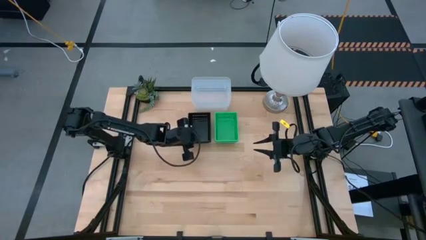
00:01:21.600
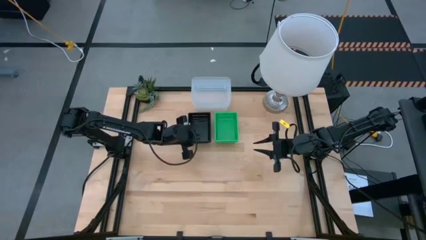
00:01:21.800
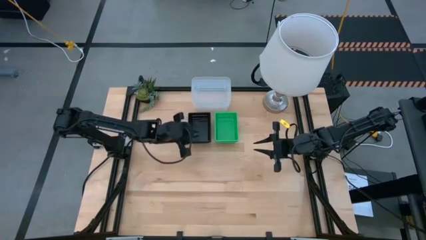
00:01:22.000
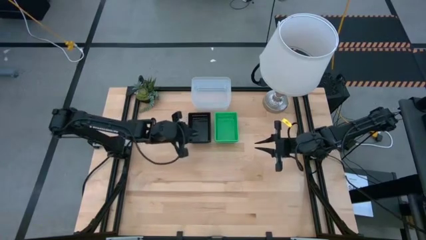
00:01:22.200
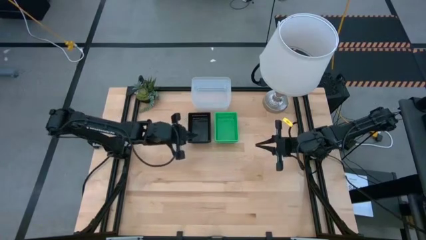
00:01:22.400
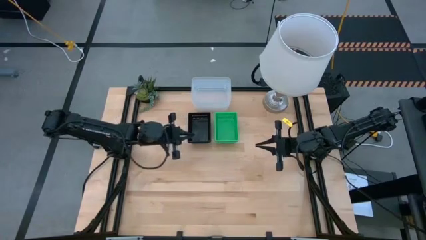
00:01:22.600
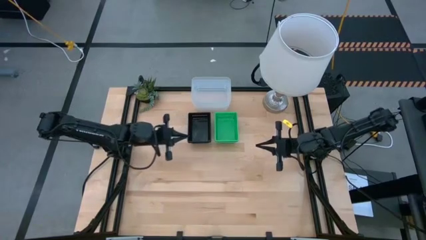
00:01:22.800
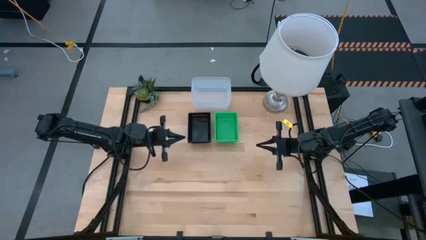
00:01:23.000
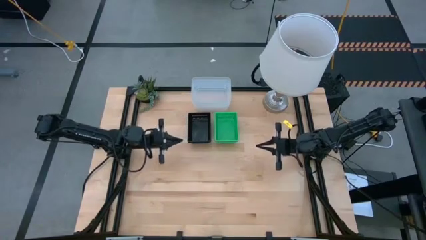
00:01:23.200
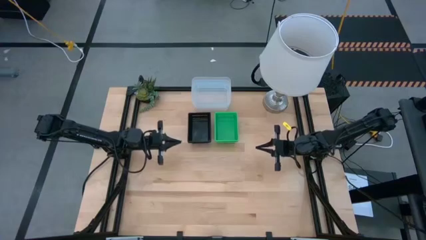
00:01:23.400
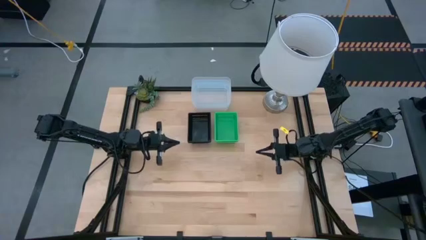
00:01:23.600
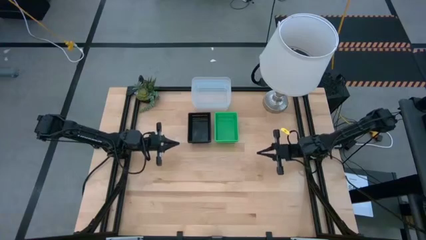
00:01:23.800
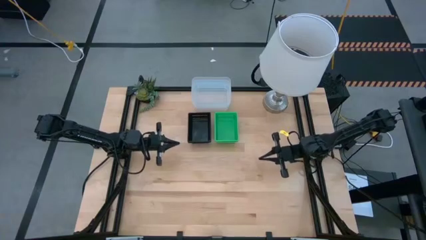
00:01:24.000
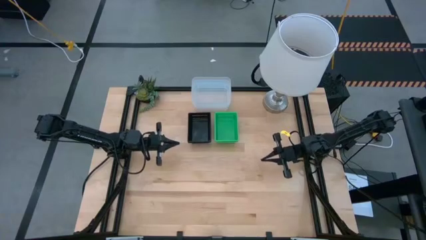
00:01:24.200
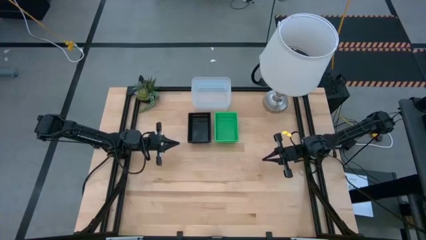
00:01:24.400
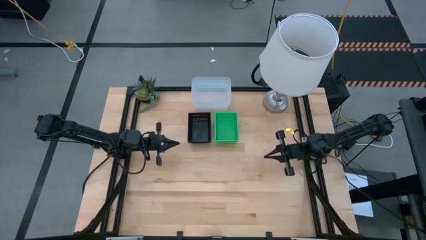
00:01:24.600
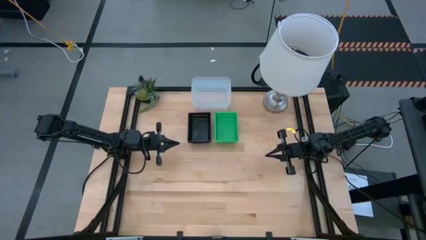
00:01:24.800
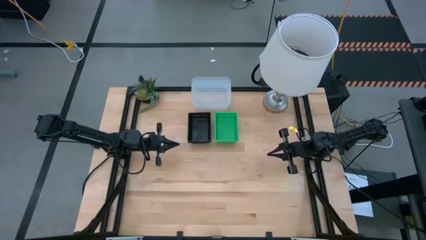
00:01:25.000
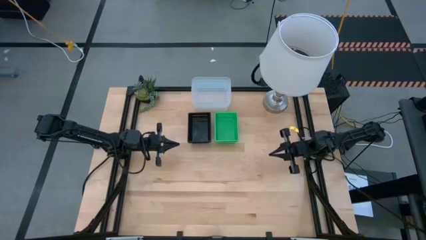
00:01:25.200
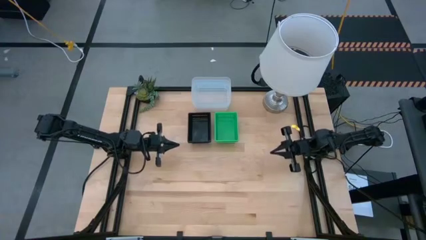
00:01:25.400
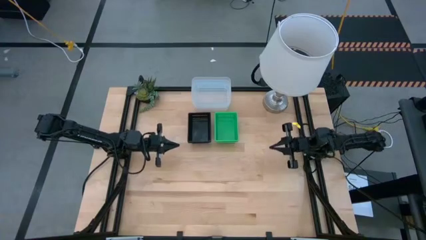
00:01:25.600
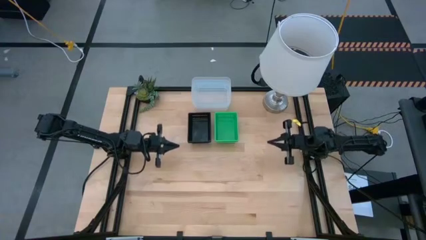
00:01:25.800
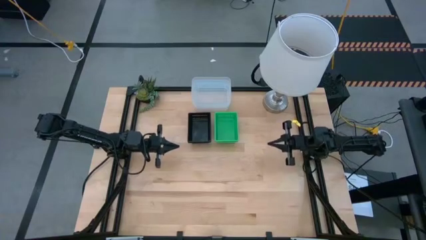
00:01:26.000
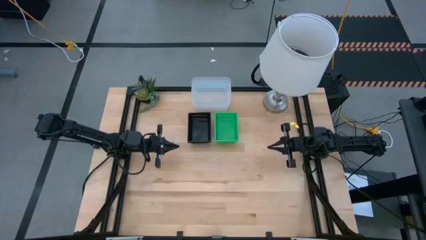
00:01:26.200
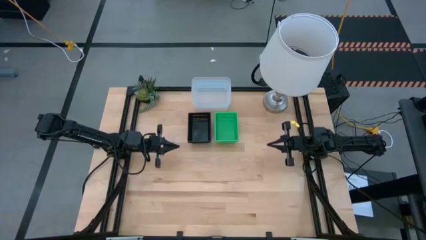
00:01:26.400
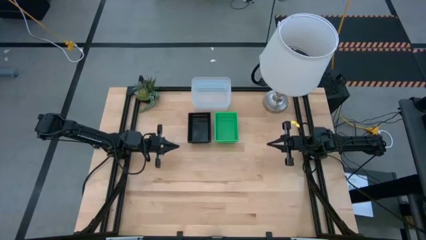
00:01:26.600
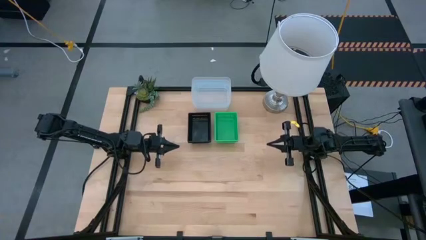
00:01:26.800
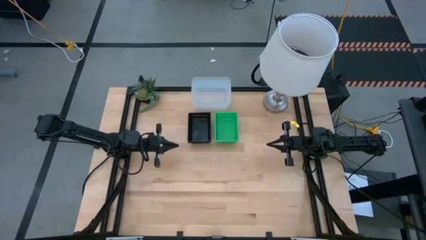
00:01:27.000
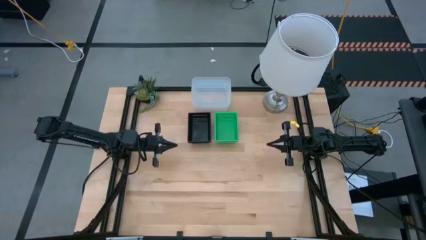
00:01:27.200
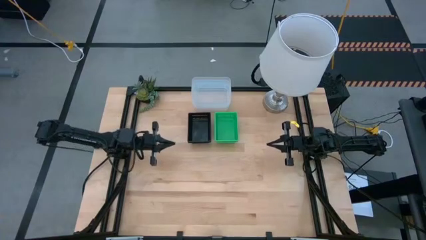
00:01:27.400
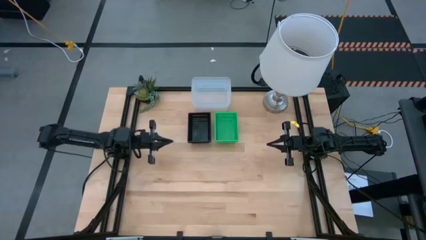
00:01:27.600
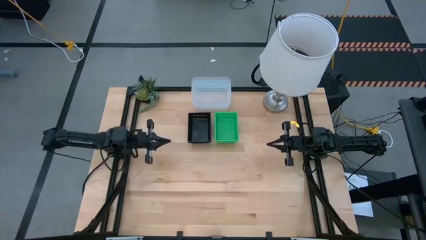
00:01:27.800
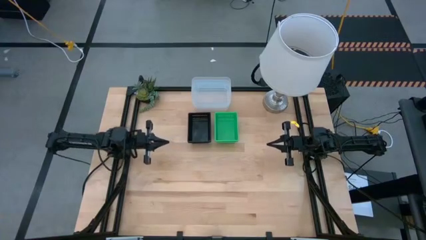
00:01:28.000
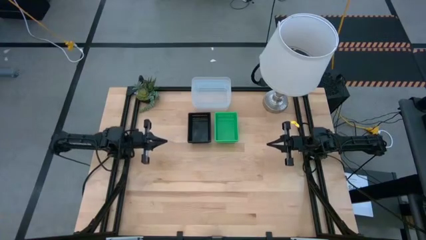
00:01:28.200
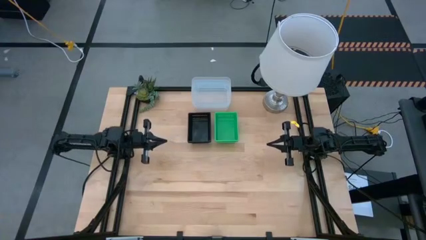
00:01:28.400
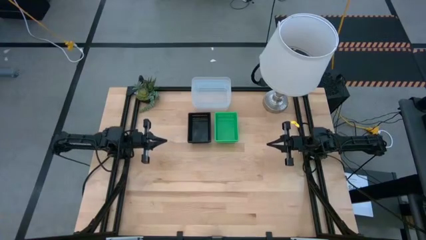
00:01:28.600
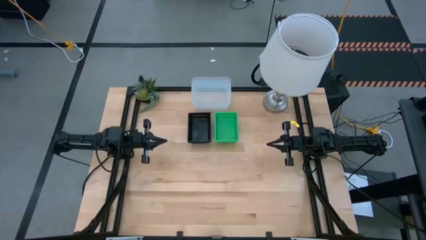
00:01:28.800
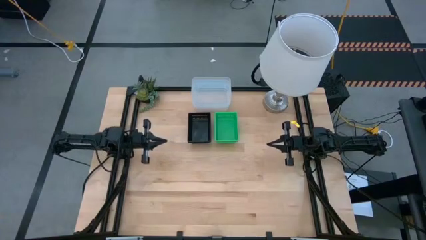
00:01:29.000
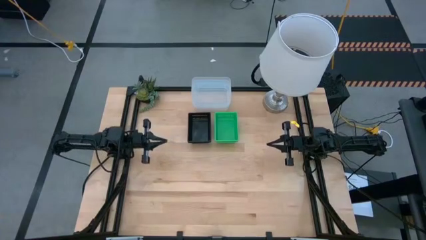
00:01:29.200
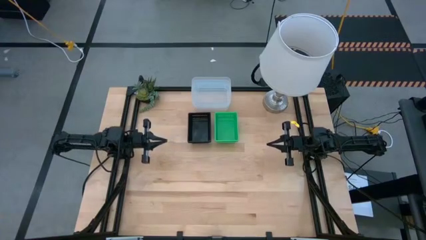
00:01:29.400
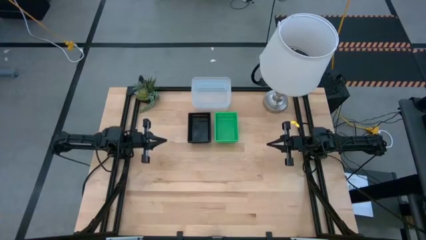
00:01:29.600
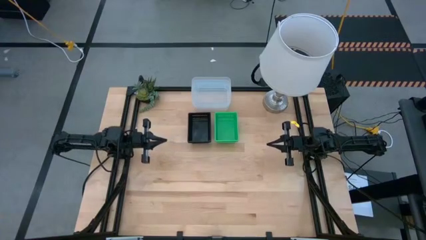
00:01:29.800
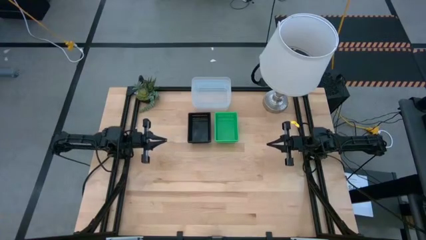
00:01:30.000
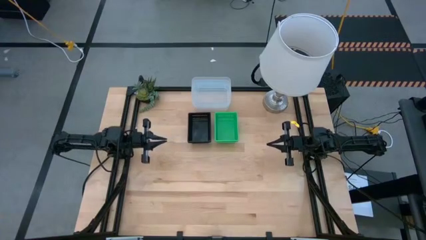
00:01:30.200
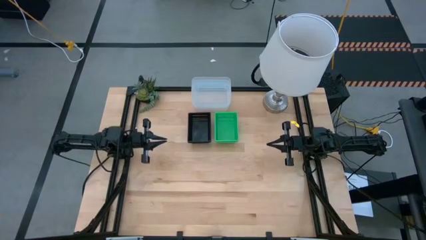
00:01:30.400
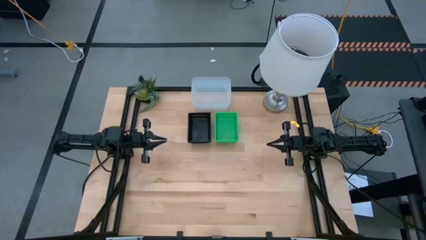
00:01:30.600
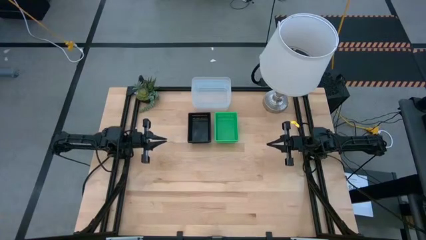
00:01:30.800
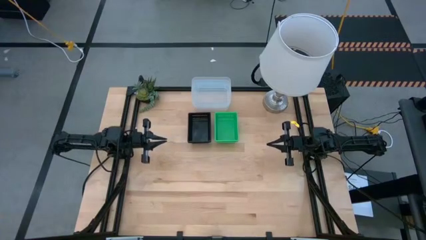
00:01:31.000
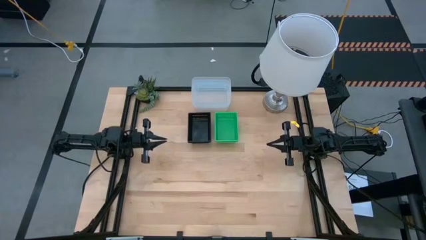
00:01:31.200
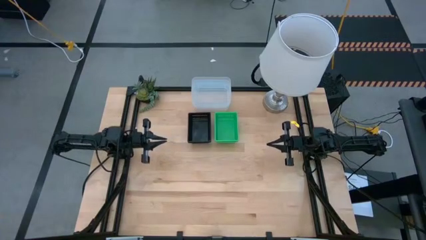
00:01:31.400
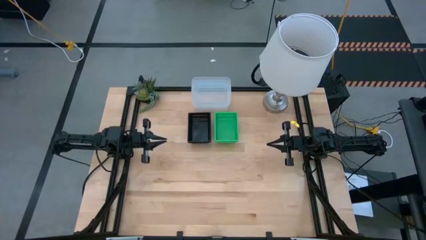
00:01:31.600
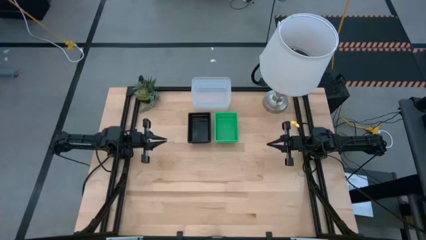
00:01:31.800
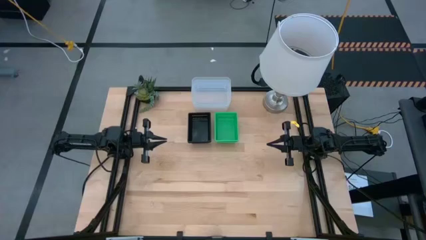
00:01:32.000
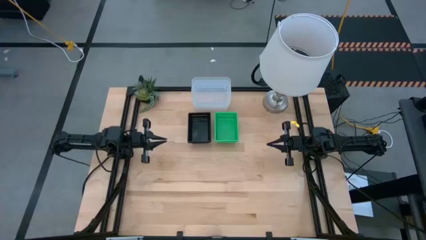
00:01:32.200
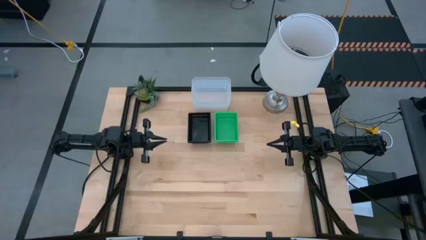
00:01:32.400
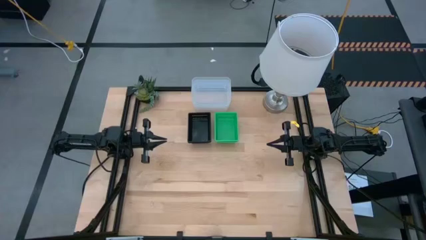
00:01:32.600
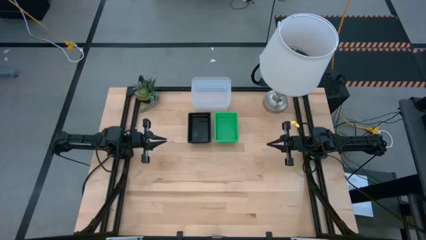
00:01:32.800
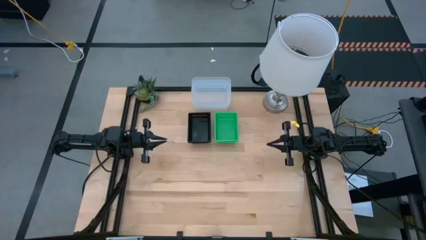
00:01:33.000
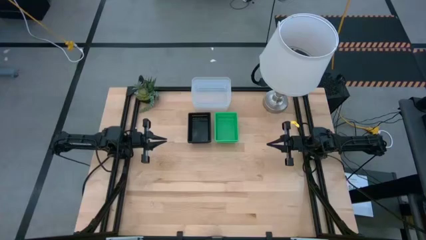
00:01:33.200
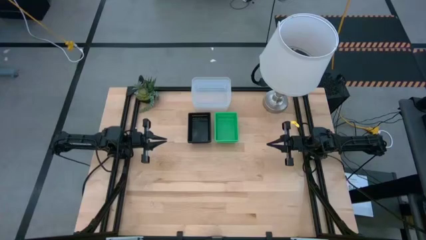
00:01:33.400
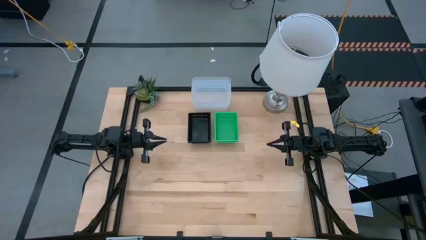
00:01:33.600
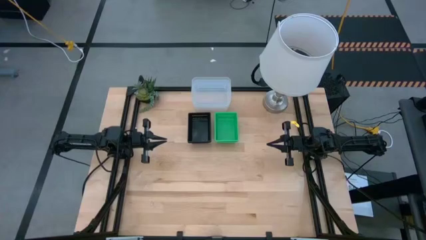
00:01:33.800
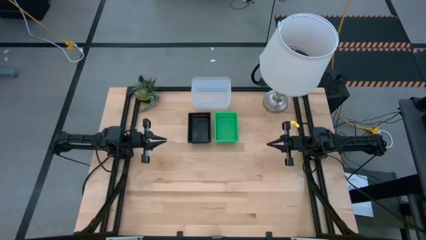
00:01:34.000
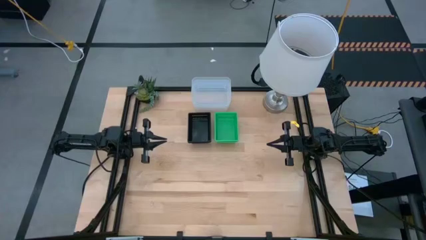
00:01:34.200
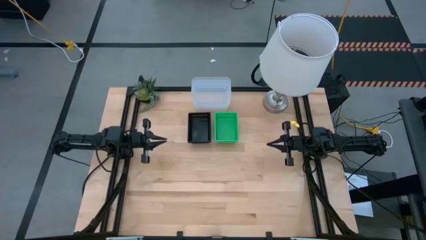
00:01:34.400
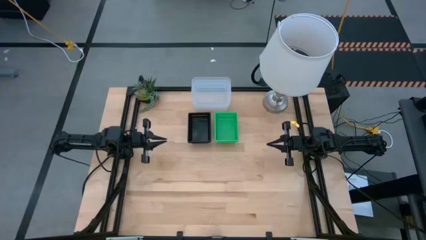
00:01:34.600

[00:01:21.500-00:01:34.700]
Return to Home Position
